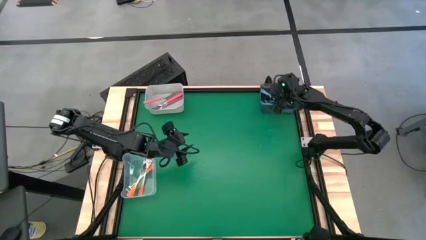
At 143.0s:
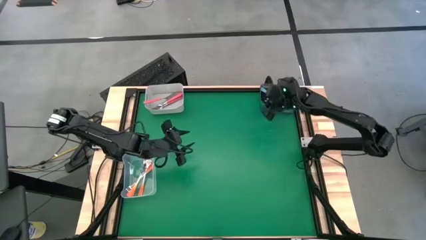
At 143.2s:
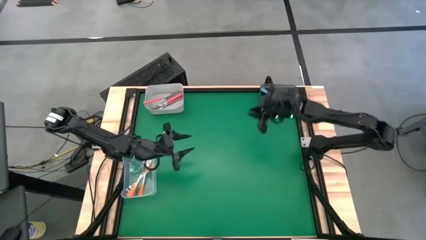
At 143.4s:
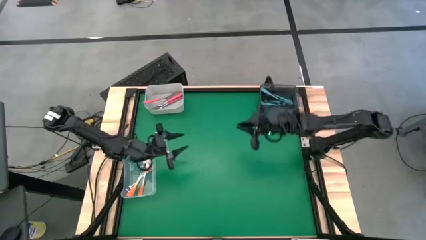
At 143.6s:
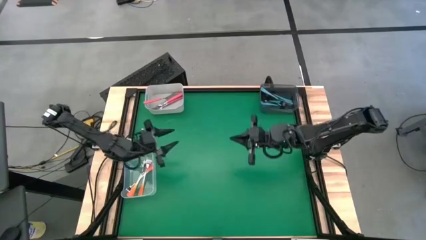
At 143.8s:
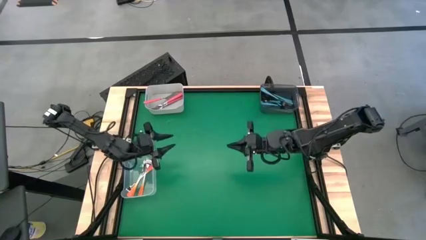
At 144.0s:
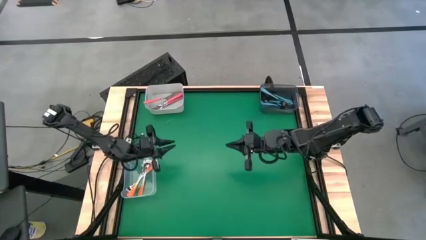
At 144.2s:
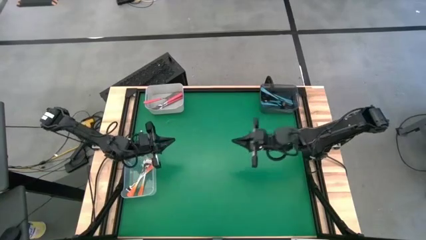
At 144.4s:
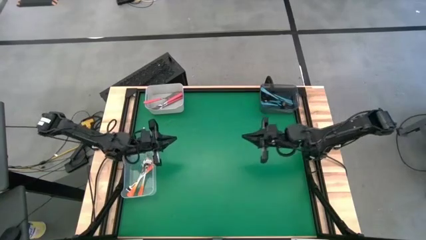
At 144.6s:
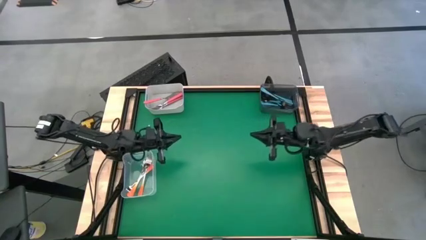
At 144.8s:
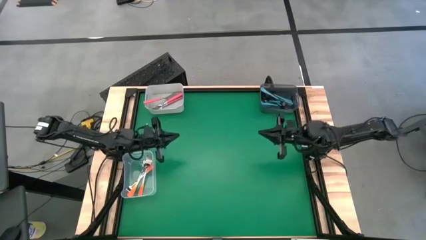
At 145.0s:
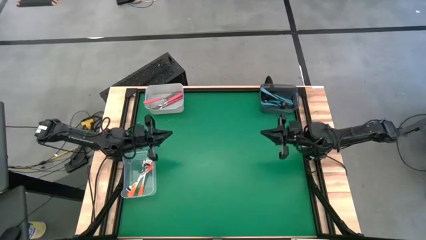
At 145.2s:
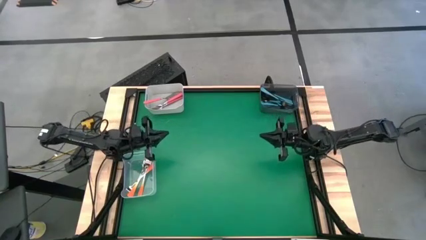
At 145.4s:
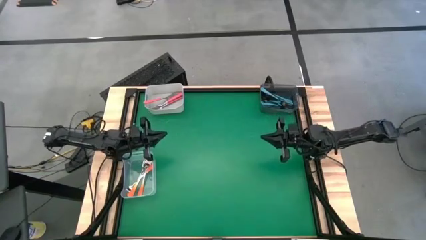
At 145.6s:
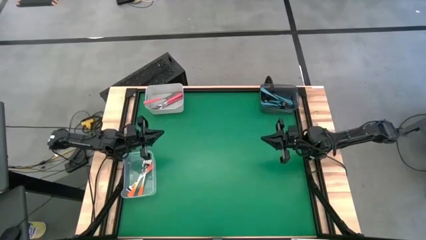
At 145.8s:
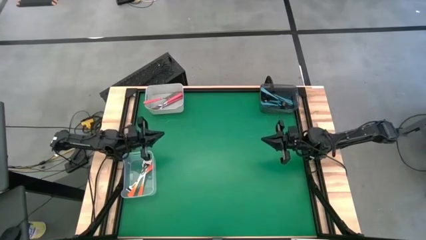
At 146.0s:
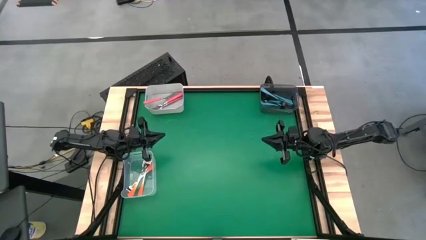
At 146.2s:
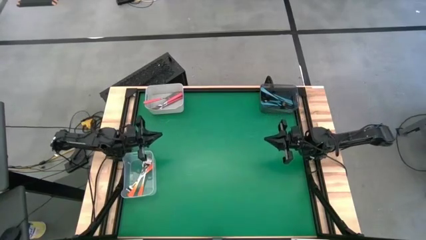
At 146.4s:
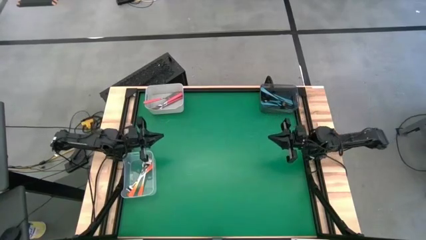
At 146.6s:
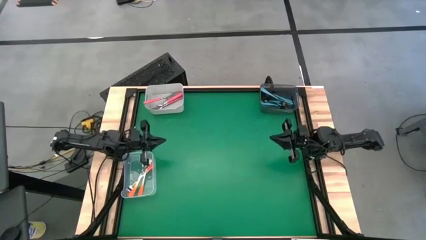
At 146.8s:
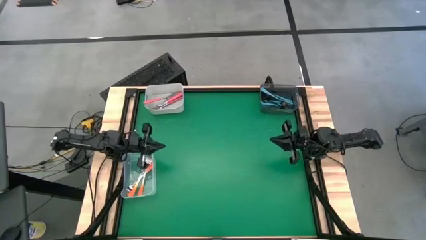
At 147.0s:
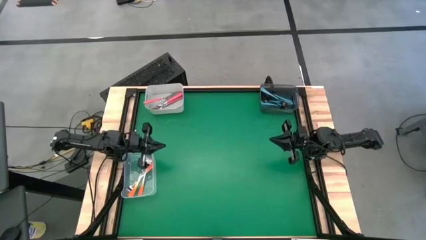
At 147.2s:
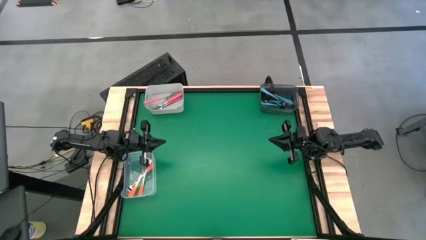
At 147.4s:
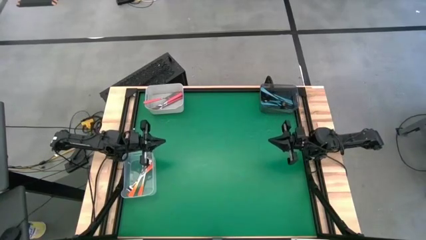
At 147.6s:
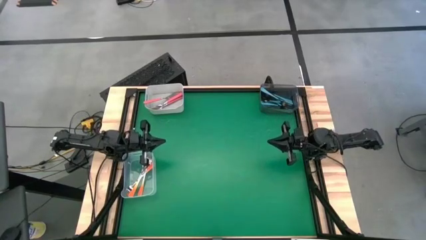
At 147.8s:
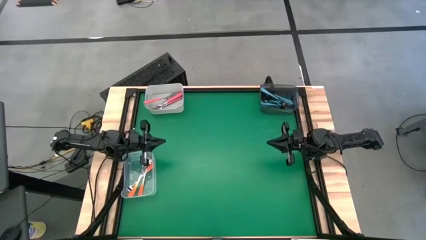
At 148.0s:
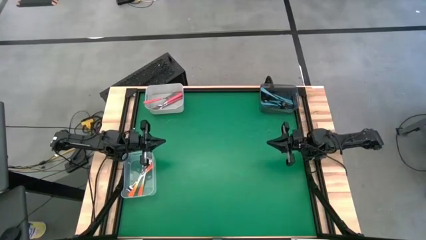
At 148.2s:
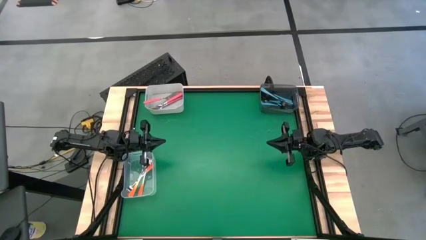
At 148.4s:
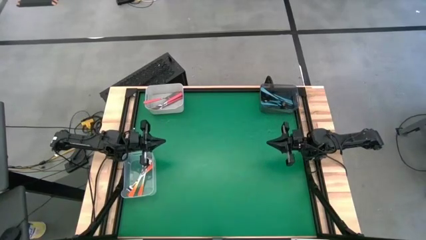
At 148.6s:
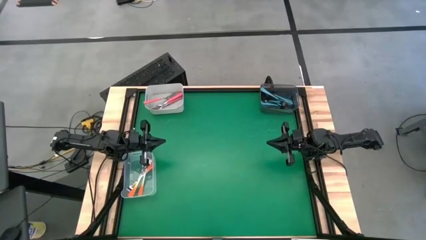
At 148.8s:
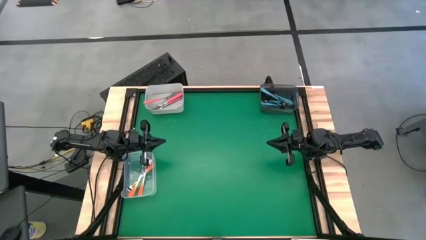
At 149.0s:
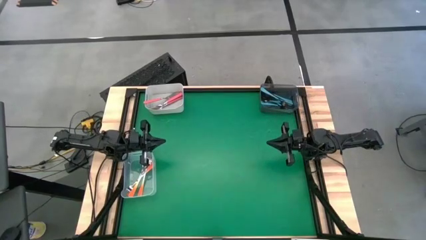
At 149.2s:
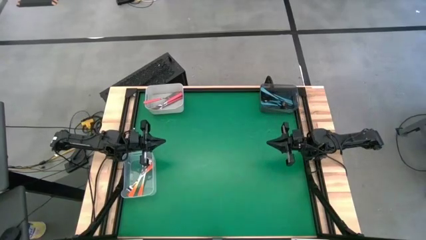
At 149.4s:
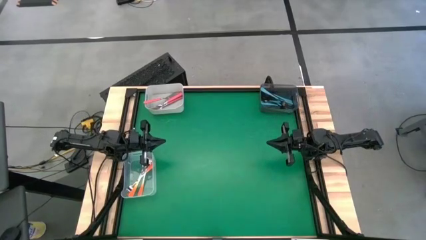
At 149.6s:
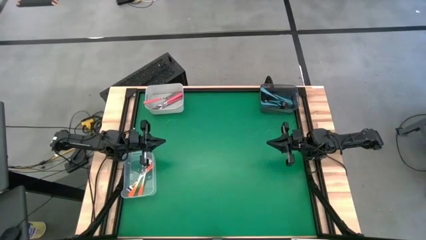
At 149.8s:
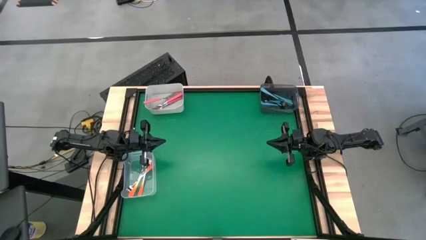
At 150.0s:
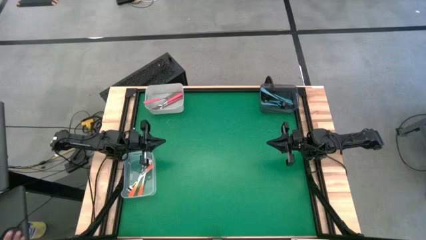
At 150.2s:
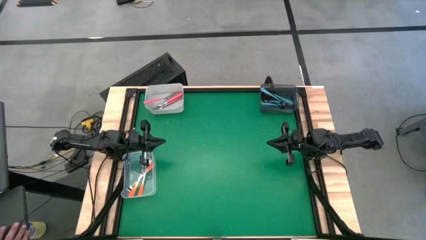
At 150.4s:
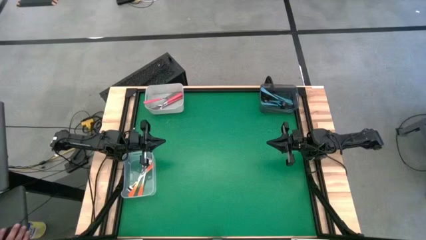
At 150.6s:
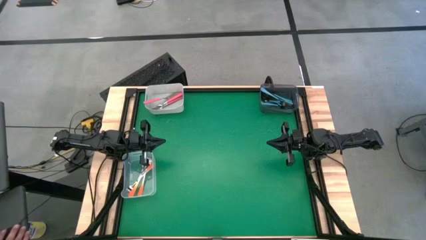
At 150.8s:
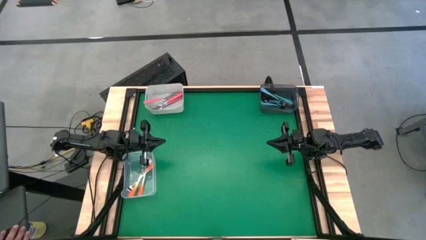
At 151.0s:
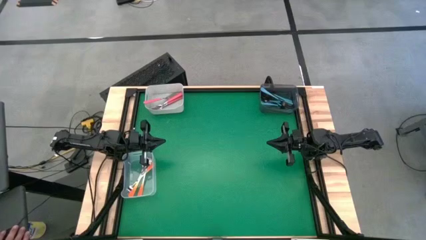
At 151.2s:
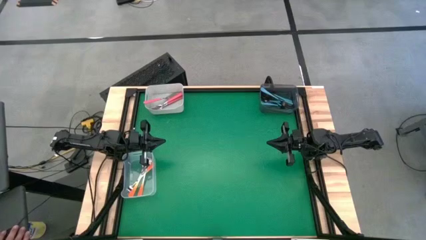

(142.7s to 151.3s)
Task: Sort silverware by color (type)
Return to Home Position

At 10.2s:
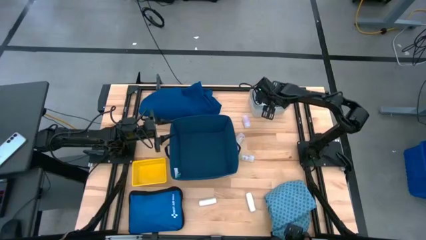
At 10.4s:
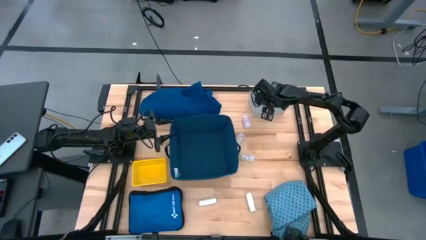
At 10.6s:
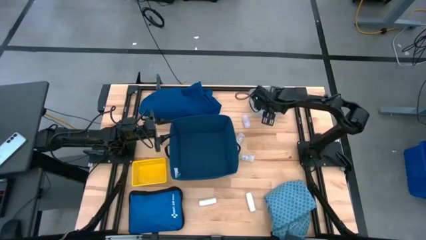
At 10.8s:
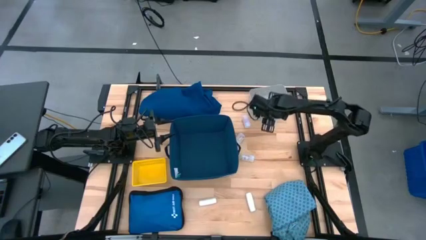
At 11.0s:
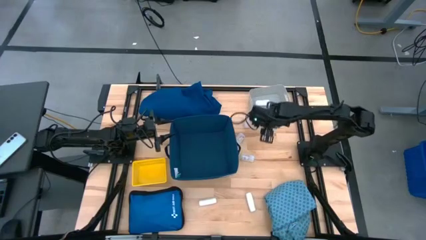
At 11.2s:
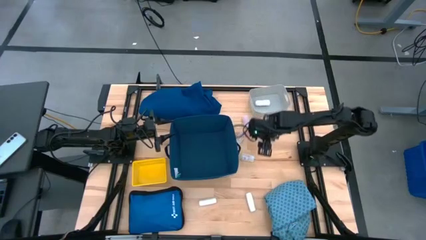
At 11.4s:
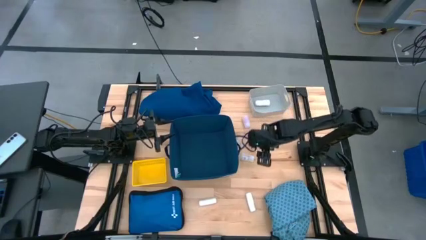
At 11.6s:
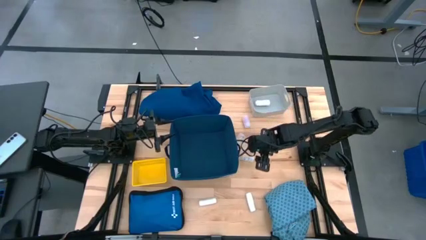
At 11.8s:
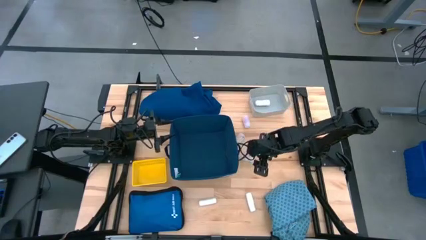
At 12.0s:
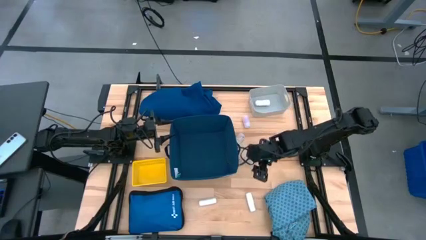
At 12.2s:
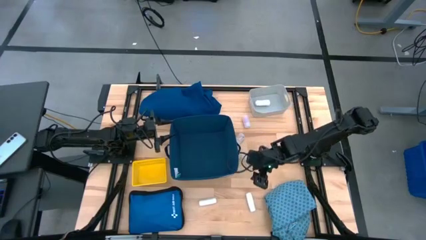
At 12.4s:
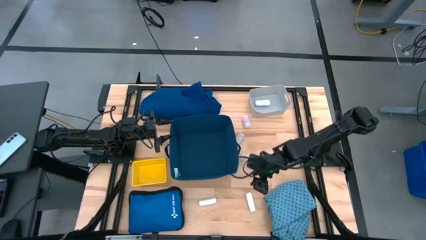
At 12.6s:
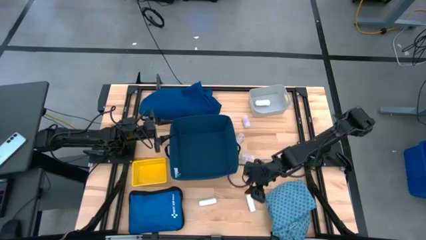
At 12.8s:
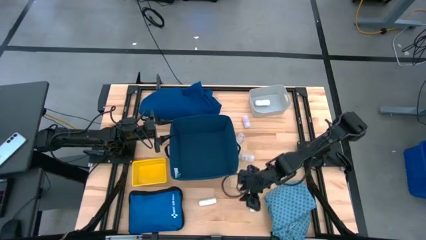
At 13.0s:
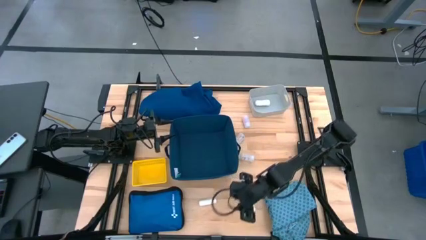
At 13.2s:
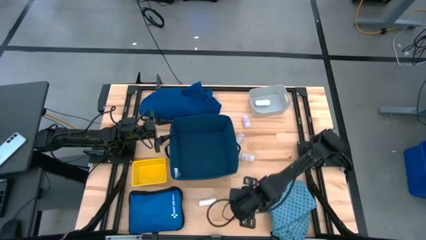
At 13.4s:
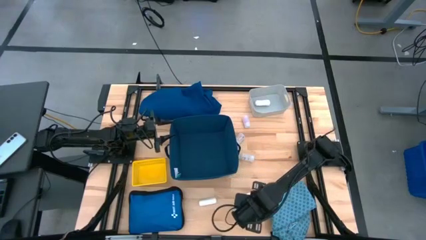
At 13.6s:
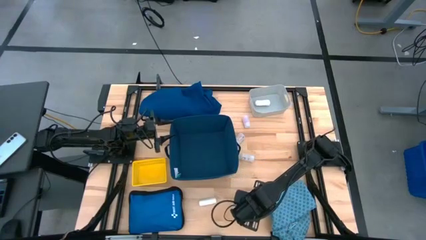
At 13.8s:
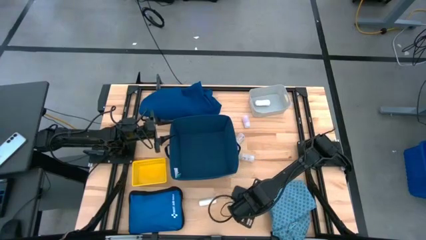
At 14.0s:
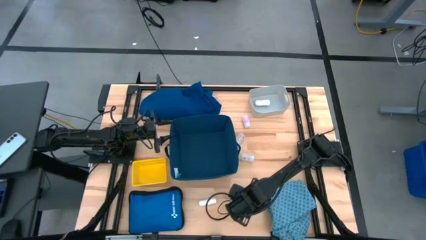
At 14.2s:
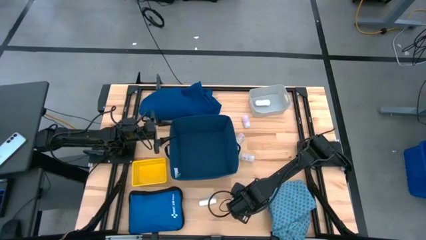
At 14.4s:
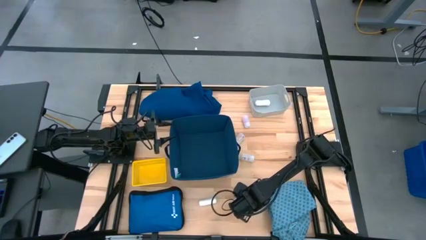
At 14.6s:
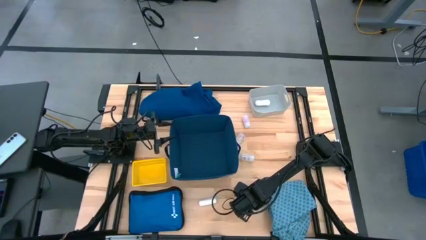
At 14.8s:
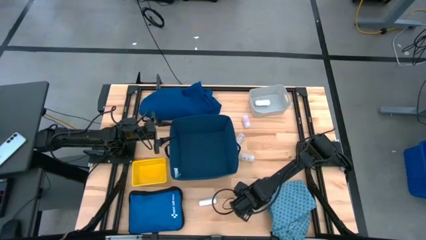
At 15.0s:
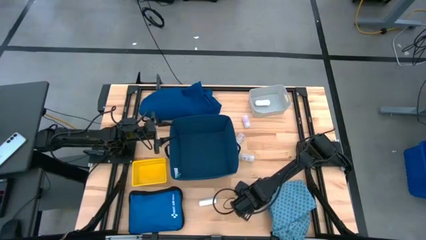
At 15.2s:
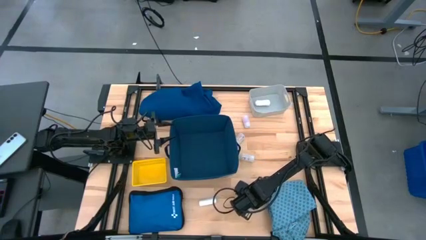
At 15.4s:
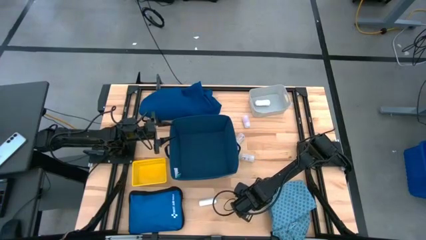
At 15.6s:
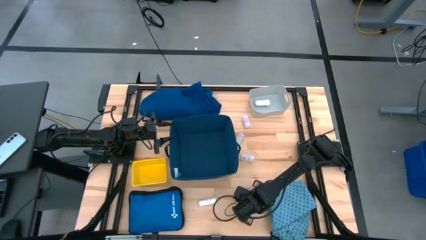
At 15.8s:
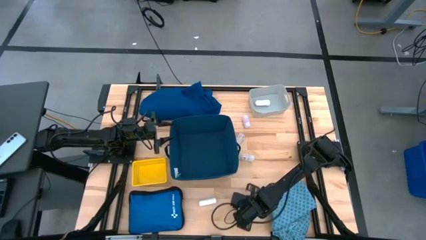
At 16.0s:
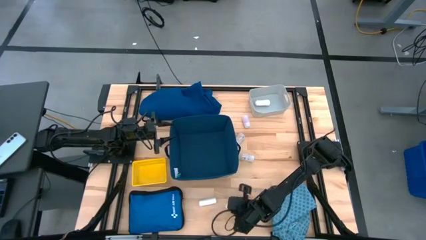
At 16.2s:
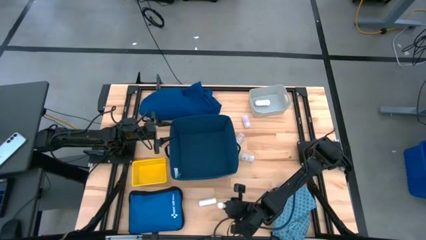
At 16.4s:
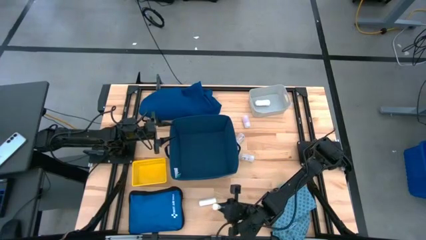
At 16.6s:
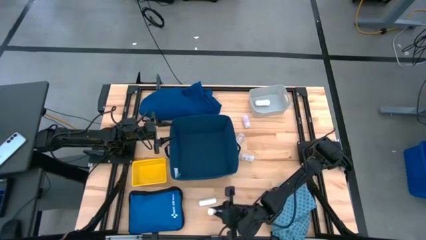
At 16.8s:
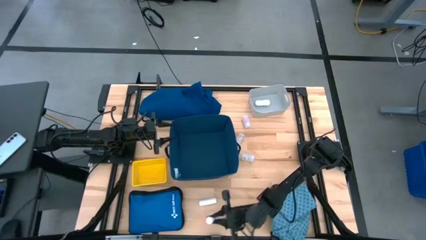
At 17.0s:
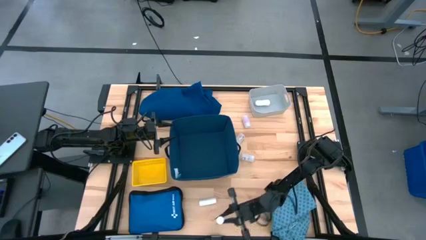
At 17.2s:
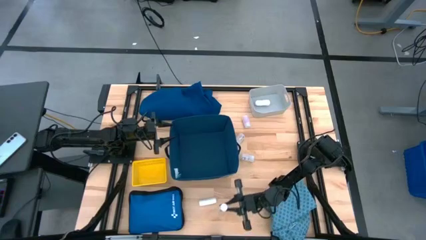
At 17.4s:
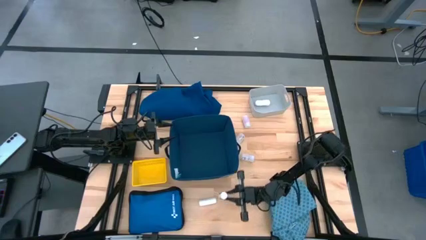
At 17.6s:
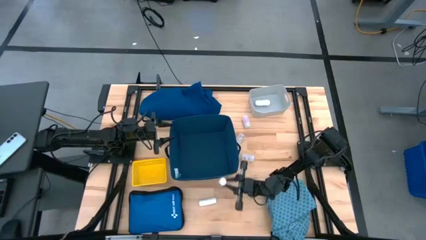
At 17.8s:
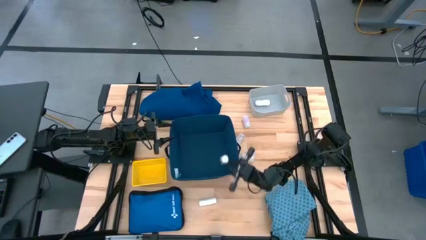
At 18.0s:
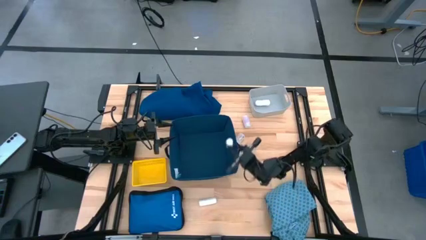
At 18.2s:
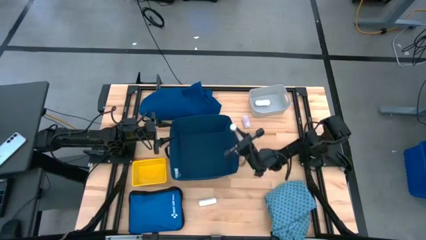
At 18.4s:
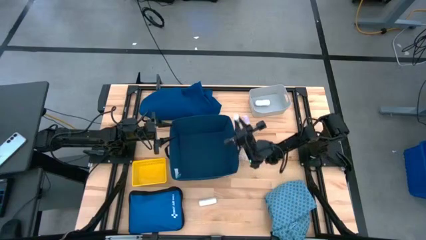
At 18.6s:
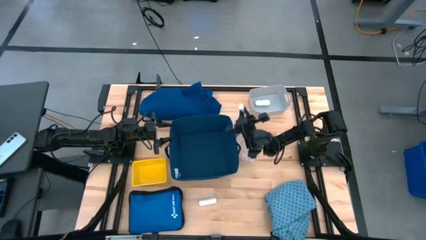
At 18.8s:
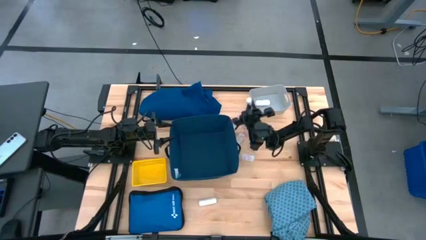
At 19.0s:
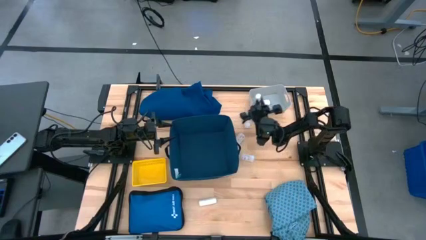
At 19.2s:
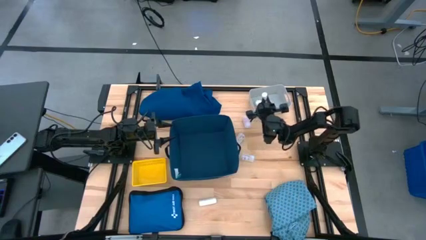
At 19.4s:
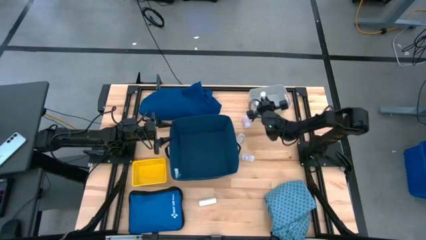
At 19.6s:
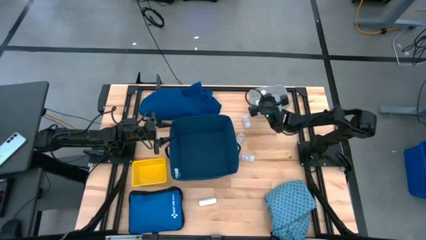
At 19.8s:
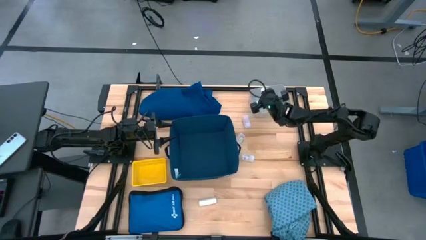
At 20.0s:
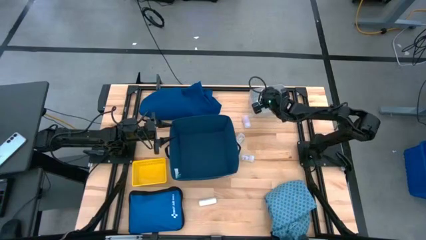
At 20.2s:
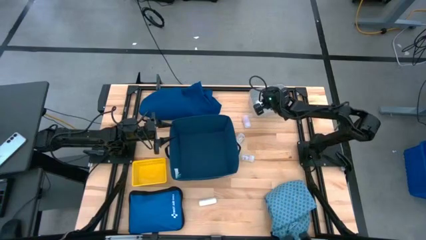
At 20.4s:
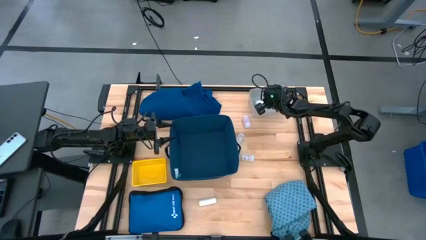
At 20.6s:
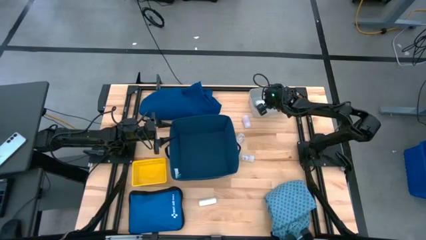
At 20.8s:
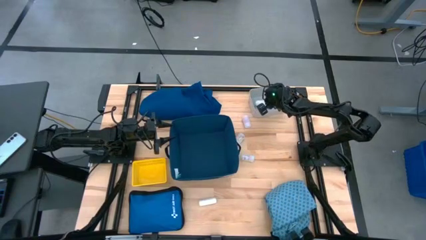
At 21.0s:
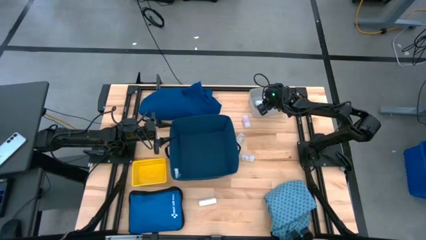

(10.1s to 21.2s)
Task: Pick & place medical supplies in basket/bin
Put the right white roll gauze into the gray bin
